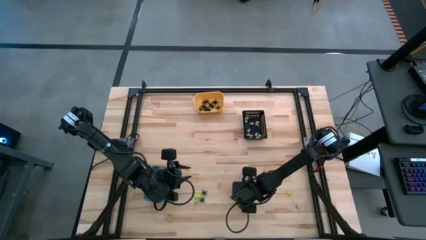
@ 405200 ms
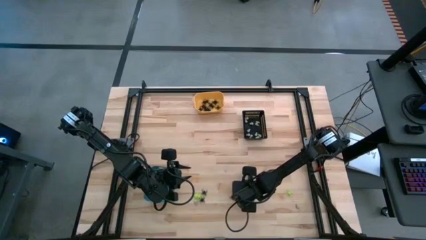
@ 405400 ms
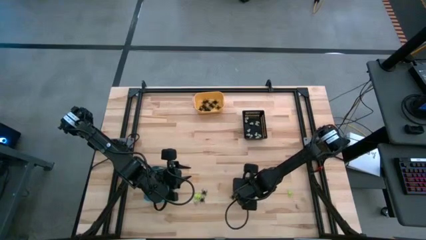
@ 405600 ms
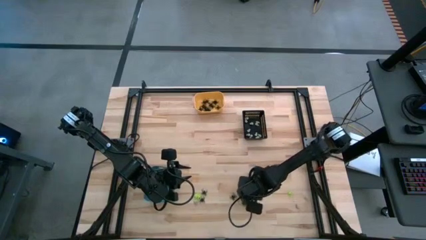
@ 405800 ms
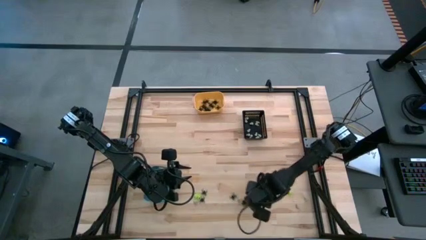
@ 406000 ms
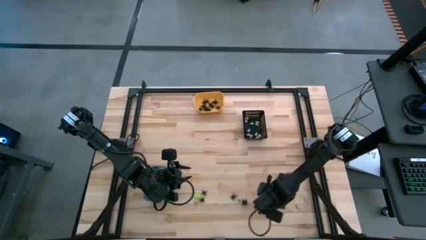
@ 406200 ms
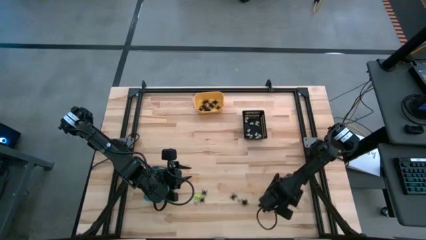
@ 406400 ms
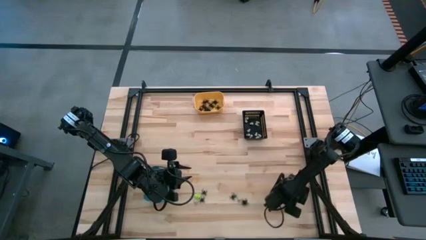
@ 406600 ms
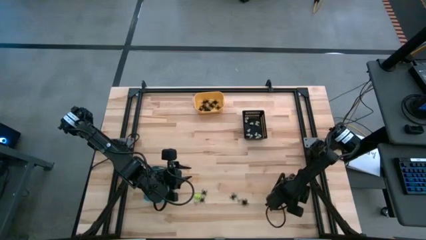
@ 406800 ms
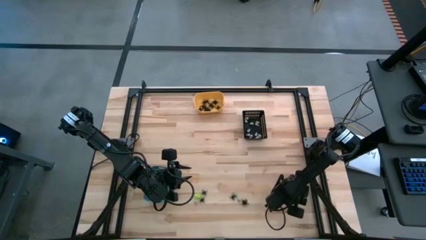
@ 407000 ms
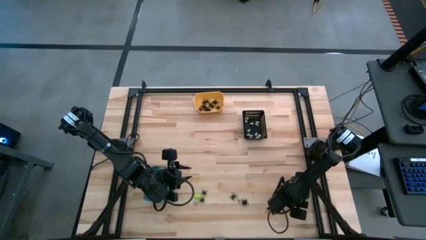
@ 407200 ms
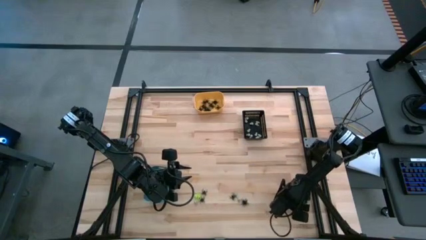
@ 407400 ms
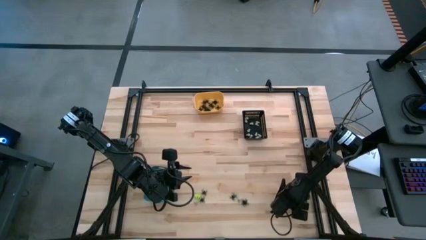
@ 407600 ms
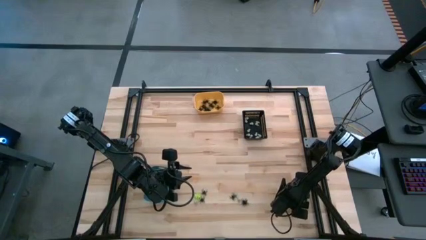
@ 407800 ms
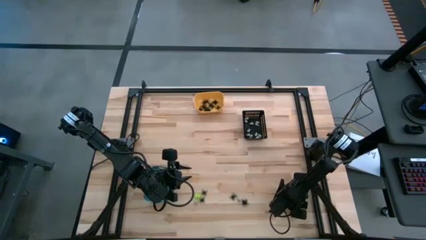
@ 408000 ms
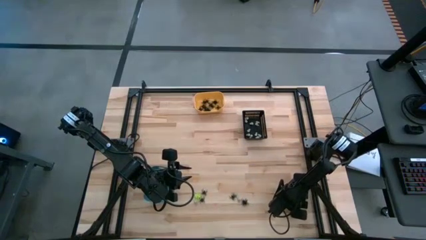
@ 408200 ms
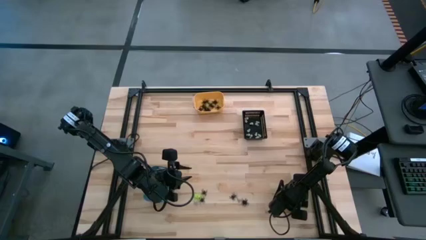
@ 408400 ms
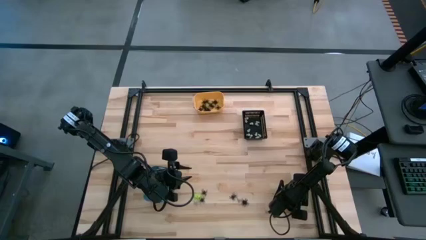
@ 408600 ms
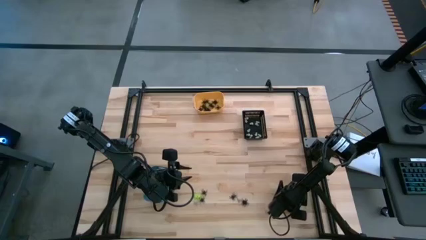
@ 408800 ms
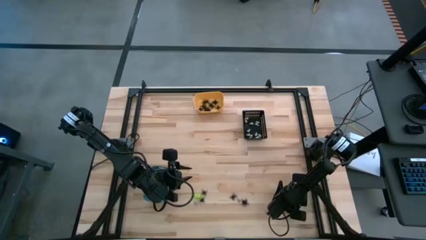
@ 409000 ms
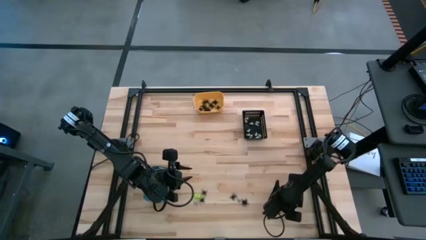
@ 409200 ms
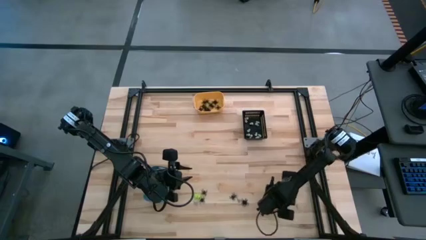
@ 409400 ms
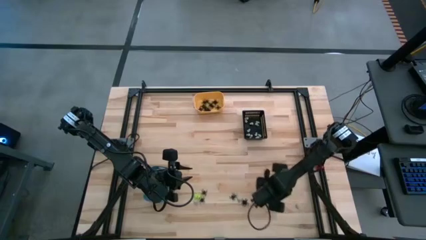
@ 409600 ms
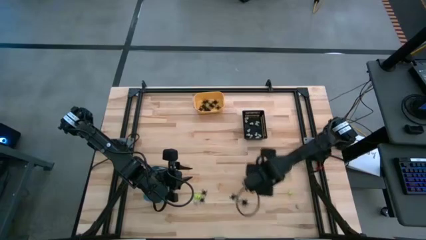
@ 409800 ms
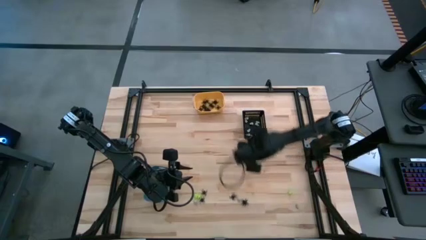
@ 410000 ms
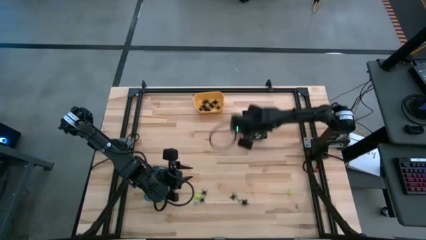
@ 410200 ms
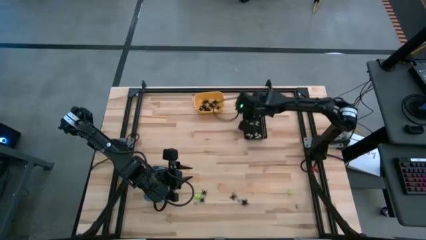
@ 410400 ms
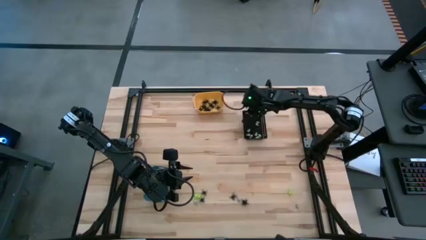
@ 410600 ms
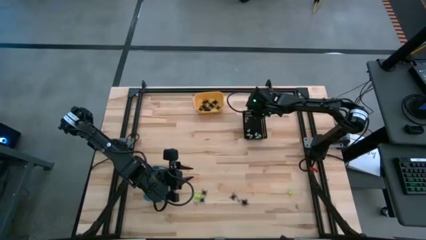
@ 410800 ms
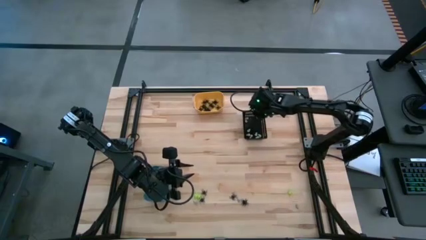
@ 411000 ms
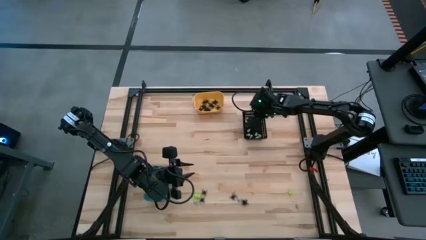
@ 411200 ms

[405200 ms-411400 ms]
Task: Sort Halloween decoration
Put the white skull toy into the black bin

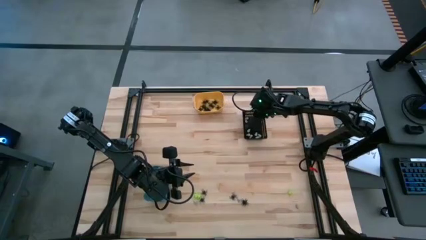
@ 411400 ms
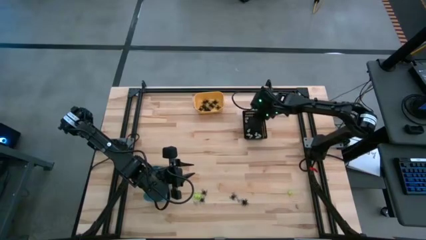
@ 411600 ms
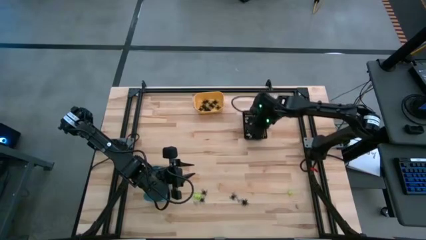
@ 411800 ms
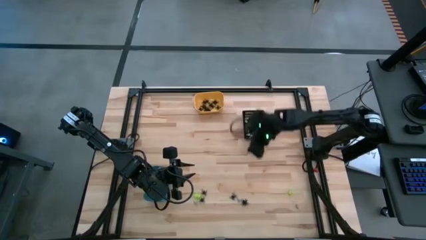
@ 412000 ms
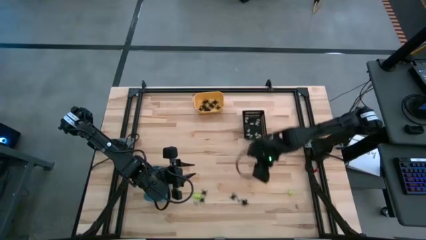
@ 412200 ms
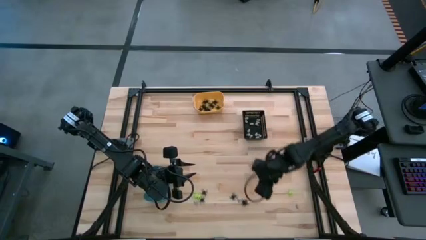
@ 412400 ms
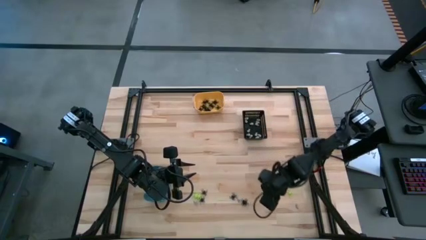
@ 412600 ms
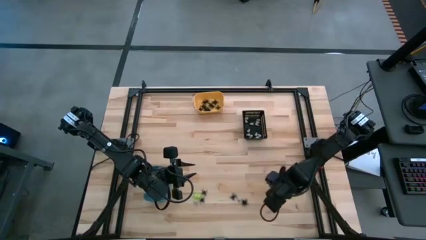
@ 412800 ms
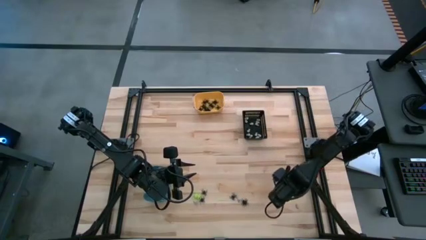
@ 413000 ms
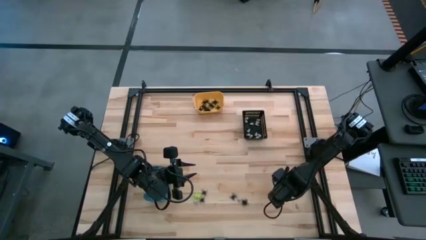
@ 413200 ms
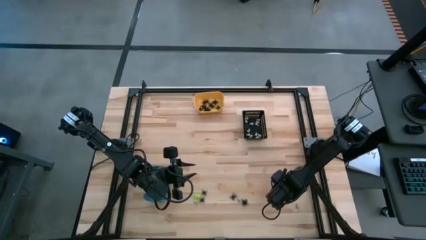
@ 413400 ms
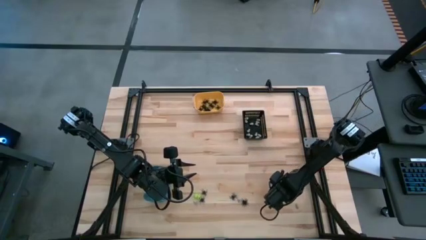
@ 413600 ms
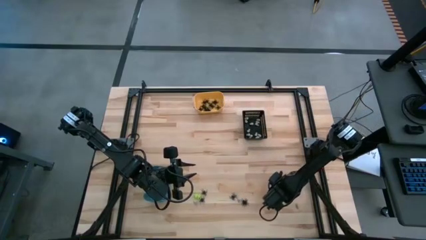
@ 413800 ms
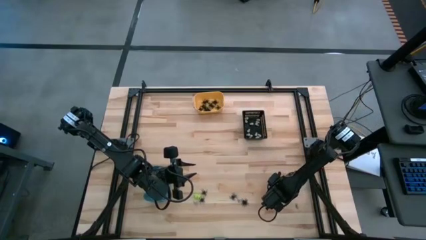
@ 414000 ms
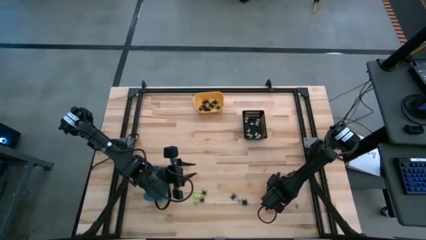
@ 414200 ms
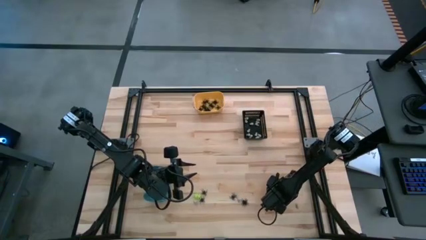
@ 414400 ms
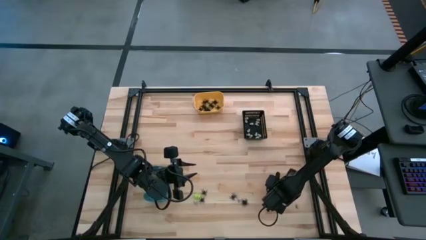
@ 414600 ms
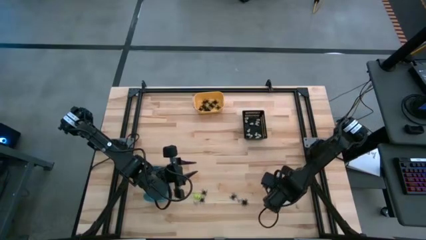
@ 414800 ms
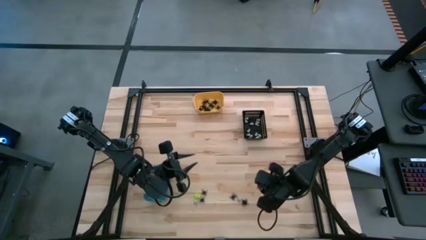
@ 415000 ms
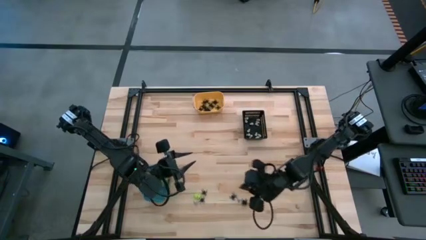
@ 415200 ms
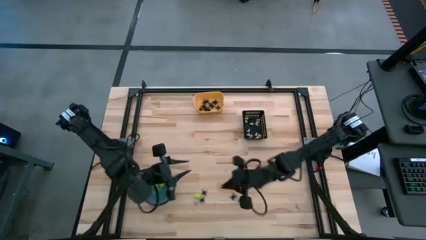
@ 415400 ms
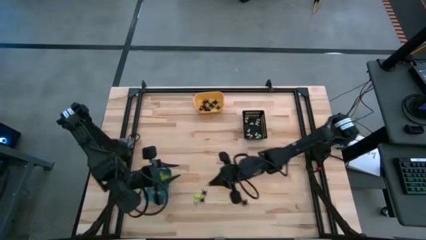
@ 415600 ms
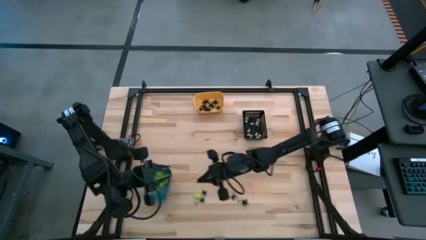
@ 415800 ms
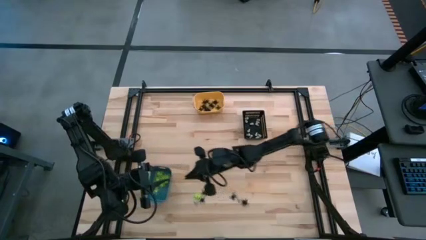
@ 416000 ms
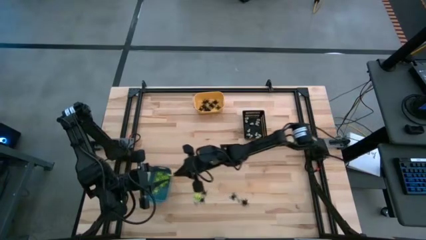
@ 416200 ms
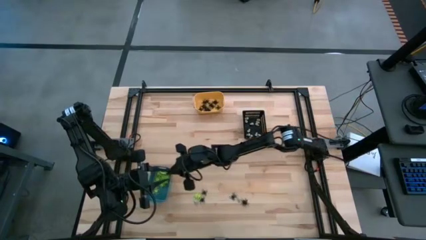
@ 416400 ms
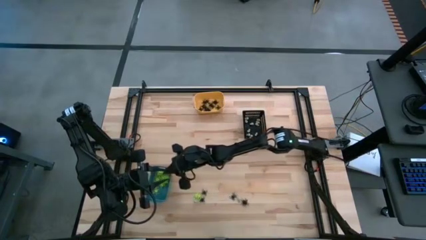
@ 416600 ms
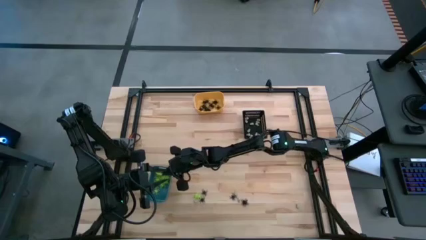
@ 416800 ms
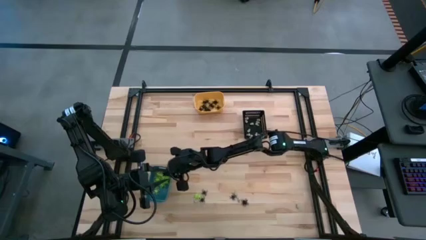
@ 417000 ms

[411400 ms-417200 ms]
Put the green spider toy into the blue bin

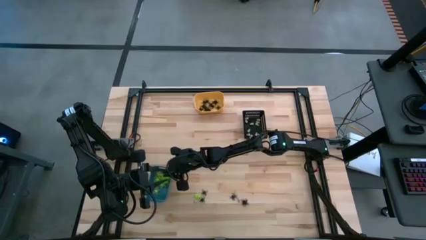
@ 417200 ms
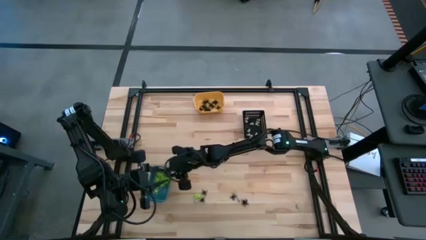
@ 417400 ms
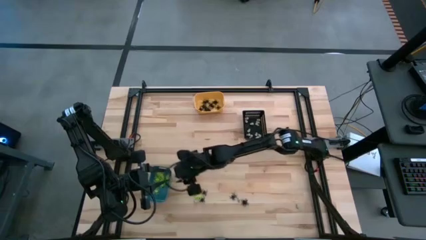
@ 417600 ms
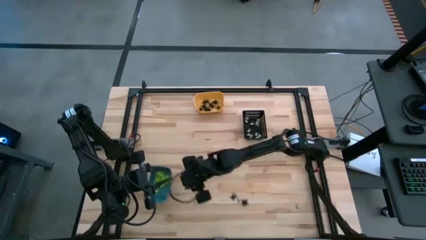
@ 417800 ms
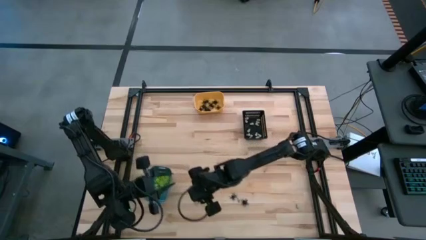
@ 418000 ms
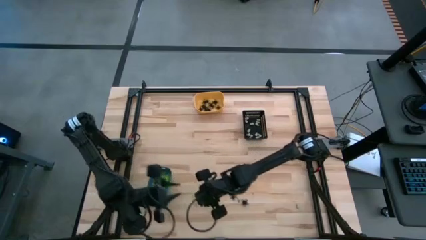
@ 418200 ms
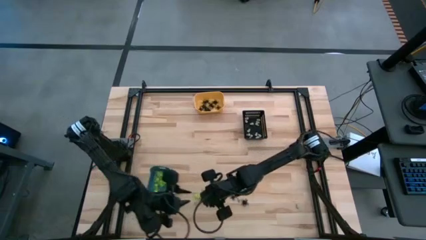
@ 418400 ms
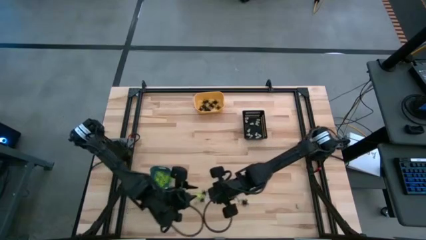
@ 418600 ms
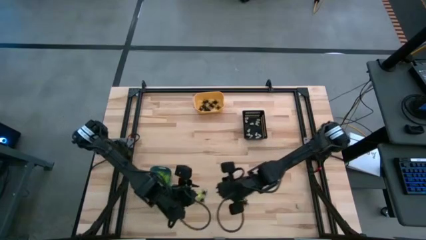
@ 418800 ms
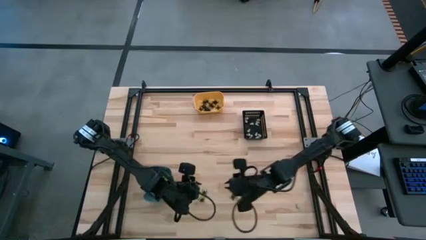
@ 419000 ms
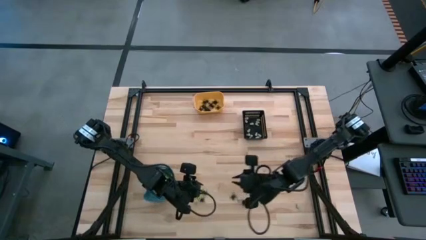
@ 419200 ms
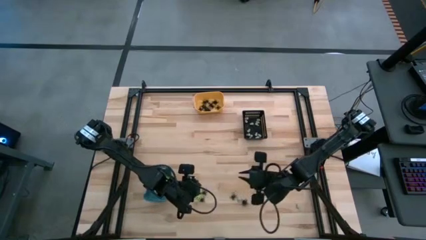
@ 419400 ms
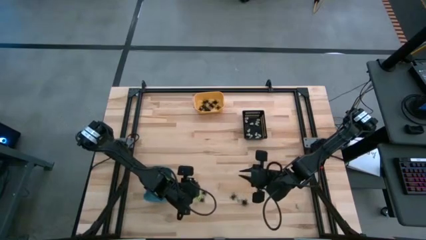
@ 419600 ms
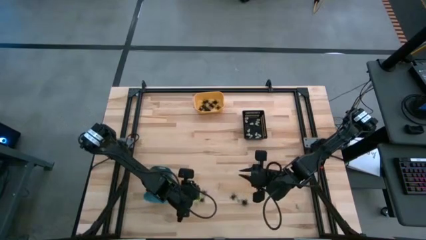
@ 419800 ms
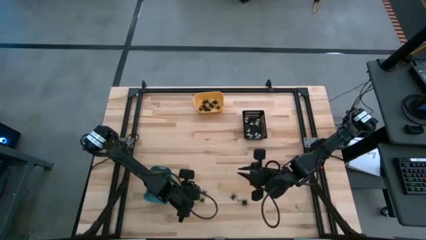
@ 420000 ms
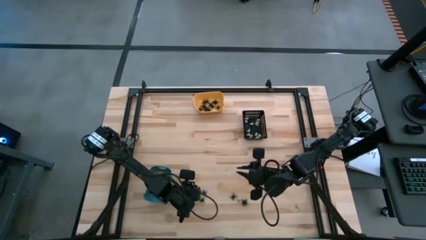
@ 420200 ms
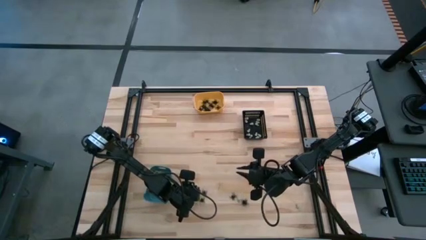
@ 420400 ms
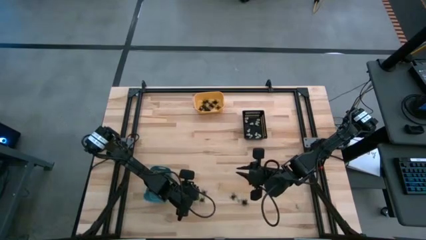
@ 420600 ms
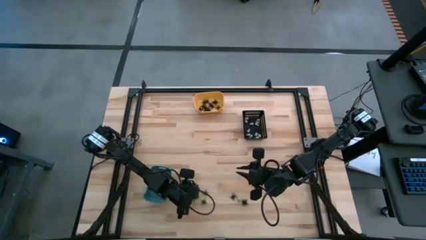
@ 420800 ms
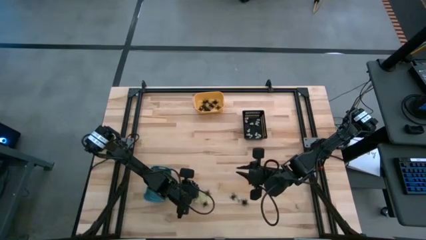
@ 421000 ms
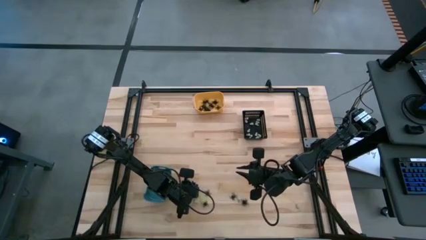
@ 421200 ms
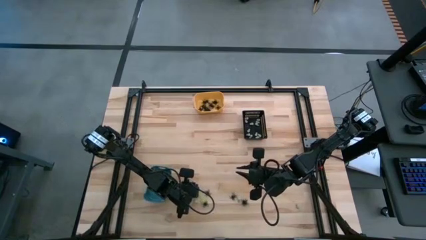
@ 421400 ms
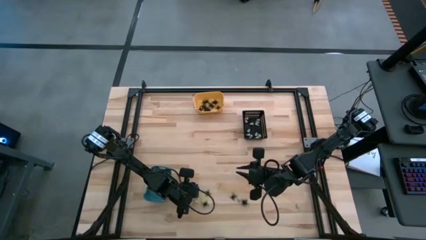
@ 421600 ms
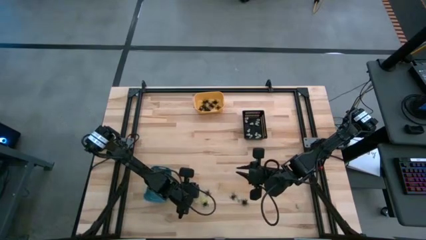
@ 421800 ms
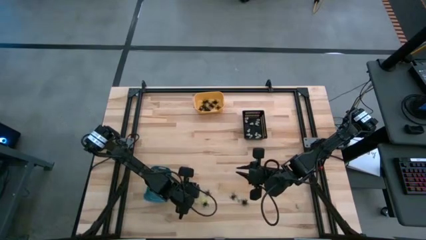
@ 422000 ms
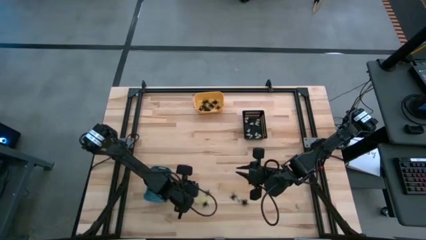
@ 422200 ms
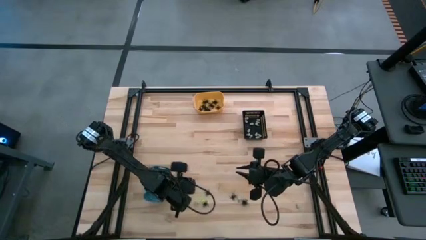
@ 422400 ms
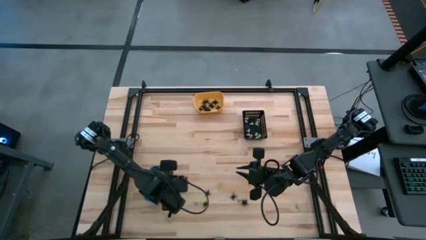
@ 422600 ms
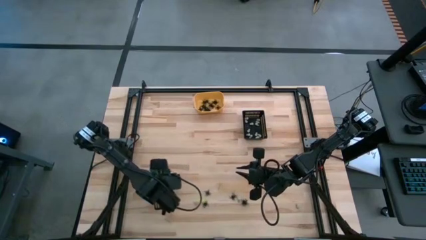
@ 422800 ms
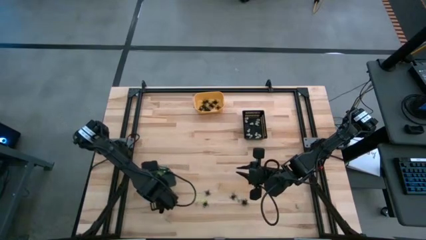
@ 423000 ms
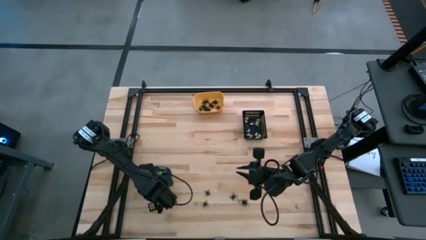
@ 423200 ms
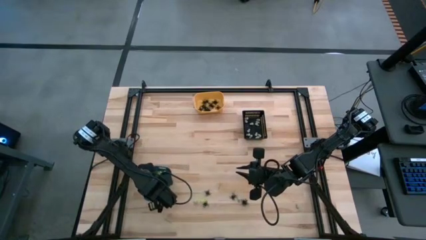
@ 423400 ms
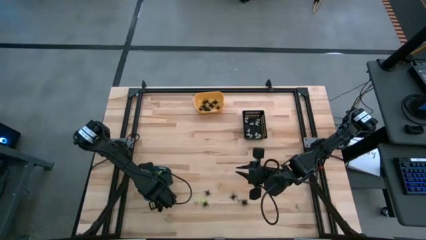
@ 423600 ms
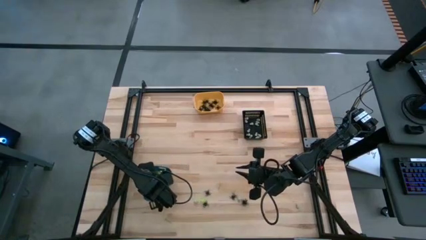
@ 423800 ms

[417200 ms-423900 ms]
Put the green spider toy into the blue bin
